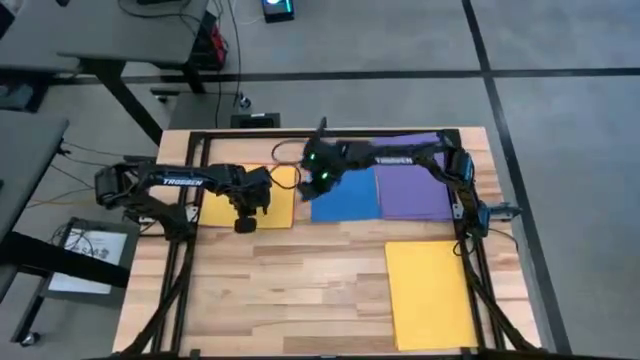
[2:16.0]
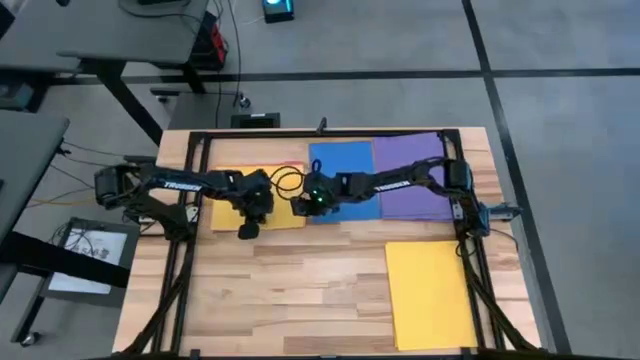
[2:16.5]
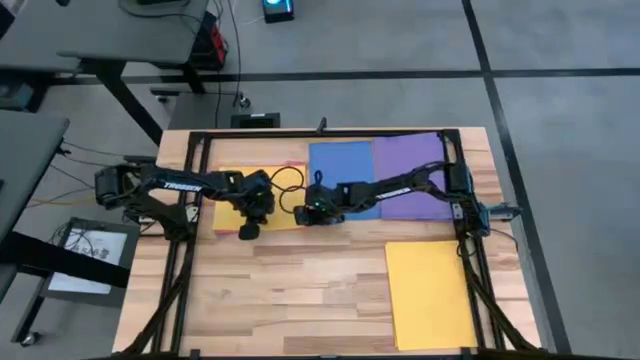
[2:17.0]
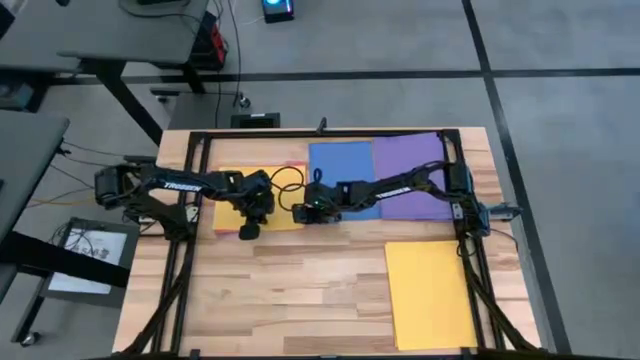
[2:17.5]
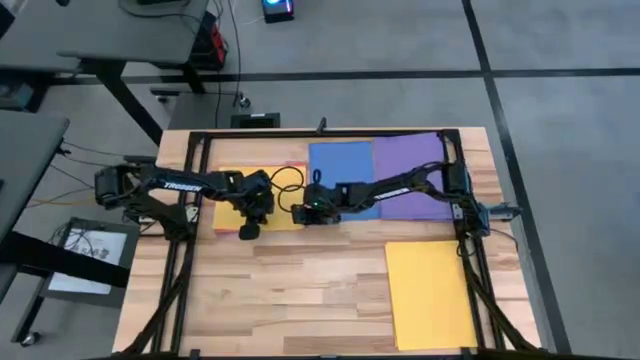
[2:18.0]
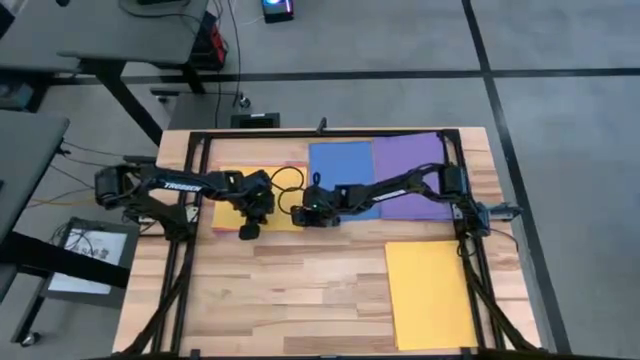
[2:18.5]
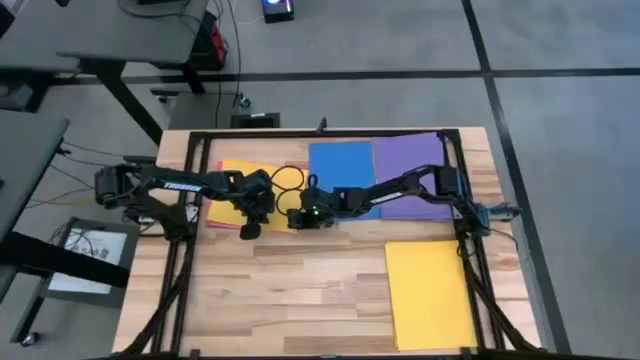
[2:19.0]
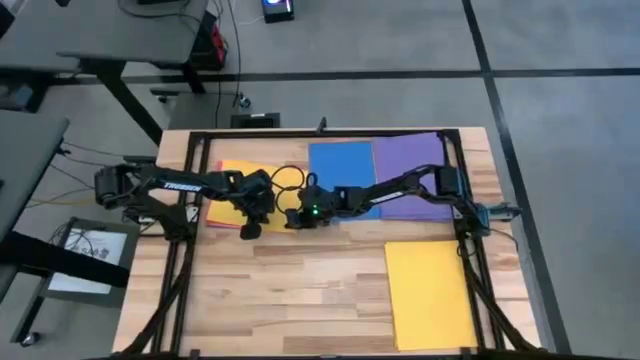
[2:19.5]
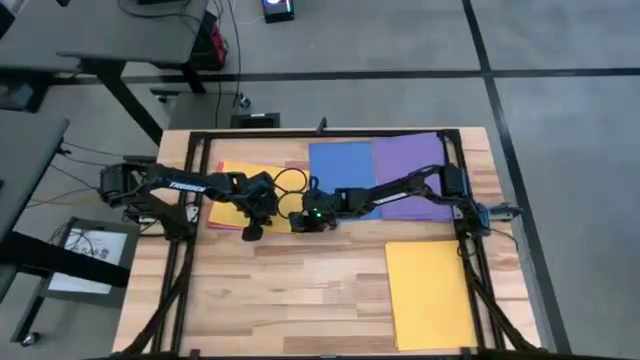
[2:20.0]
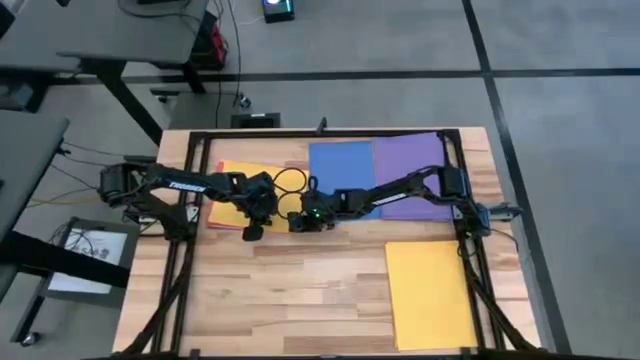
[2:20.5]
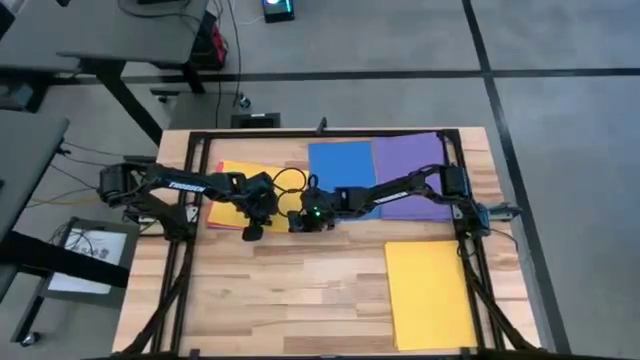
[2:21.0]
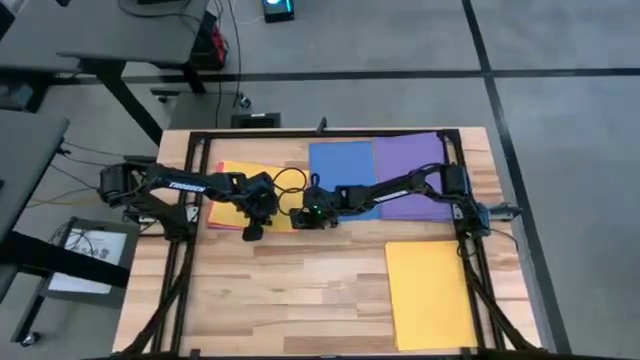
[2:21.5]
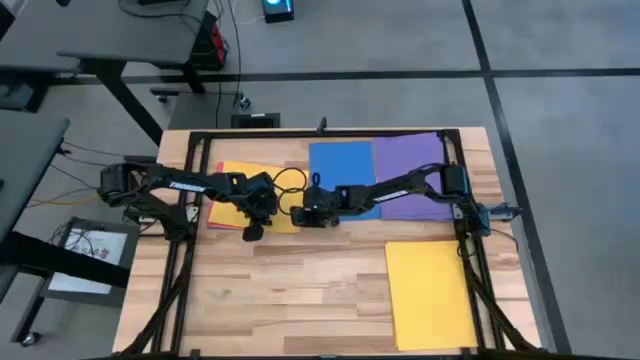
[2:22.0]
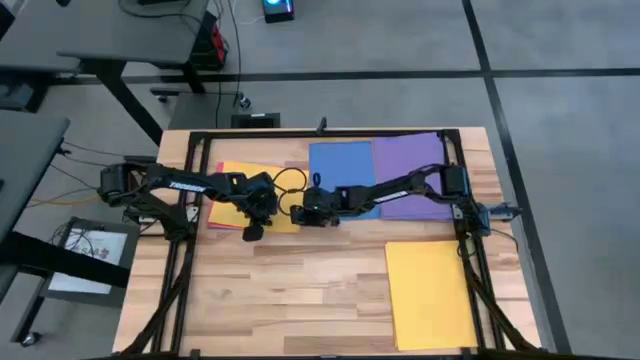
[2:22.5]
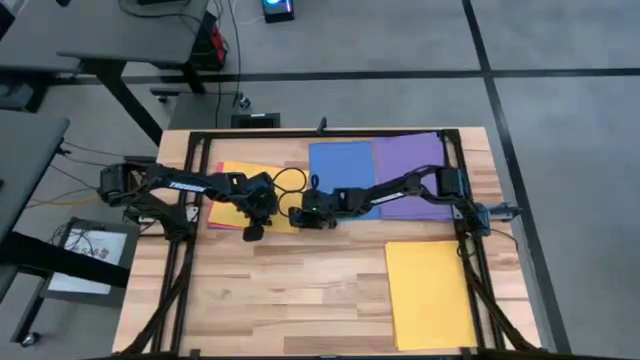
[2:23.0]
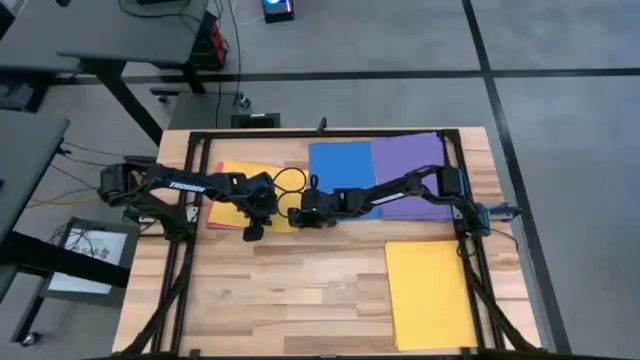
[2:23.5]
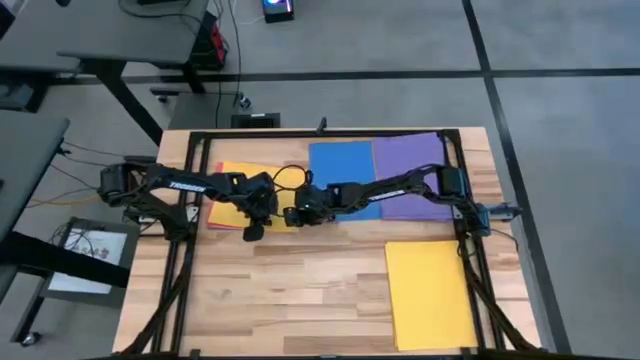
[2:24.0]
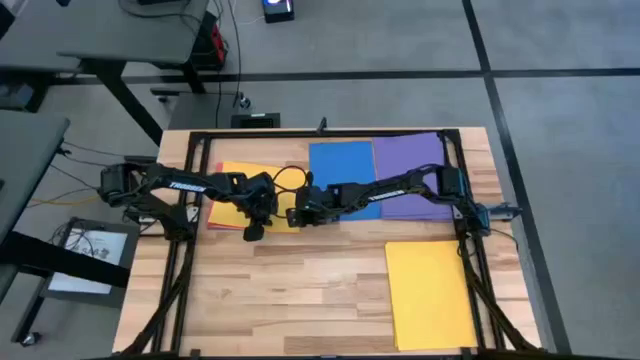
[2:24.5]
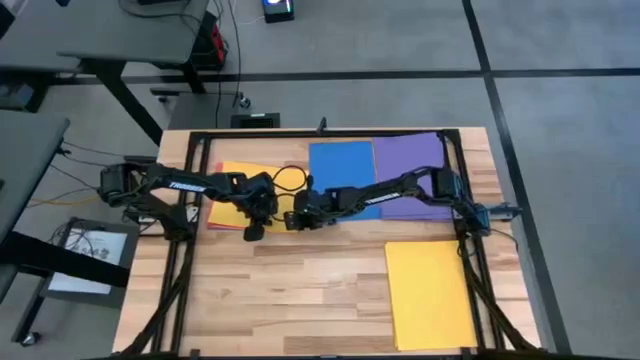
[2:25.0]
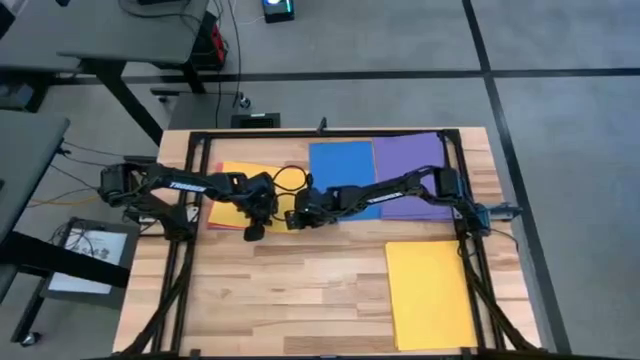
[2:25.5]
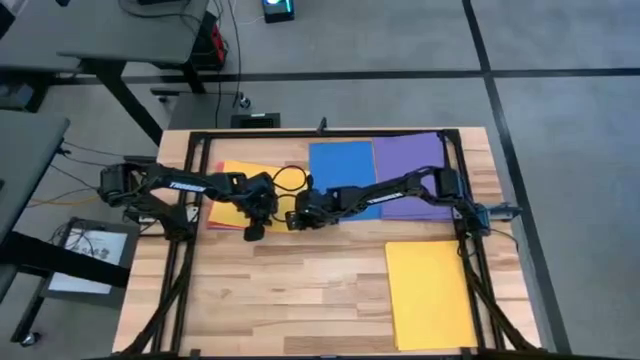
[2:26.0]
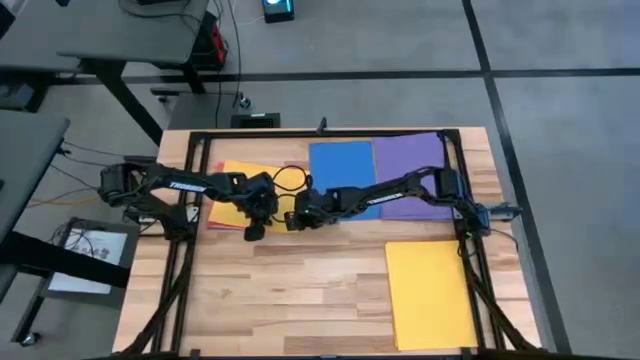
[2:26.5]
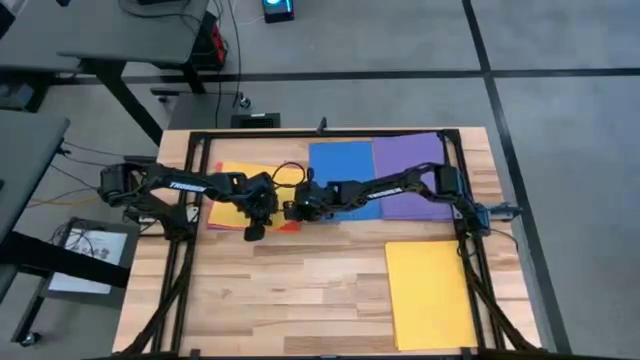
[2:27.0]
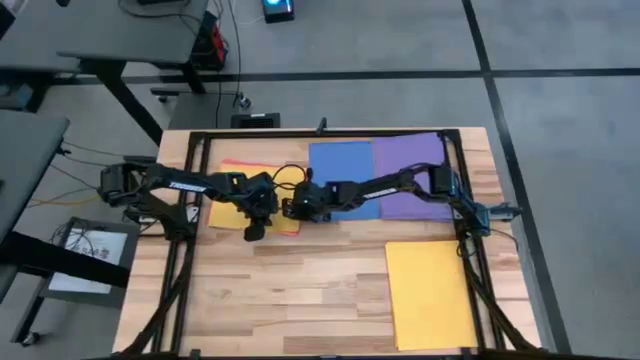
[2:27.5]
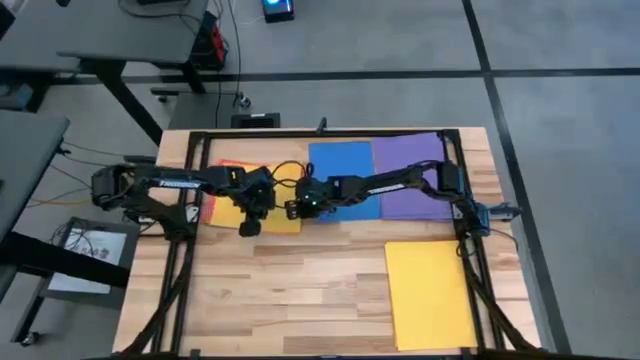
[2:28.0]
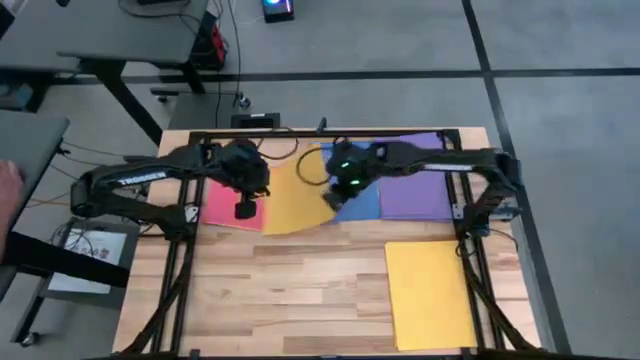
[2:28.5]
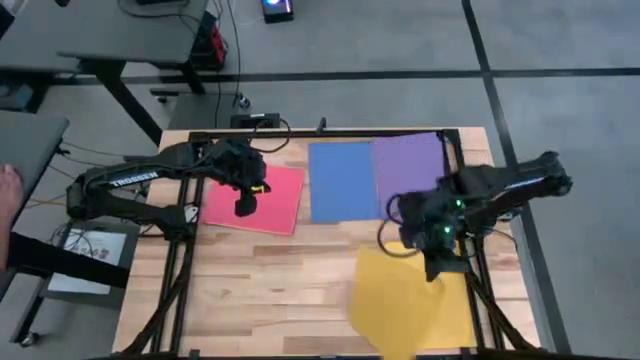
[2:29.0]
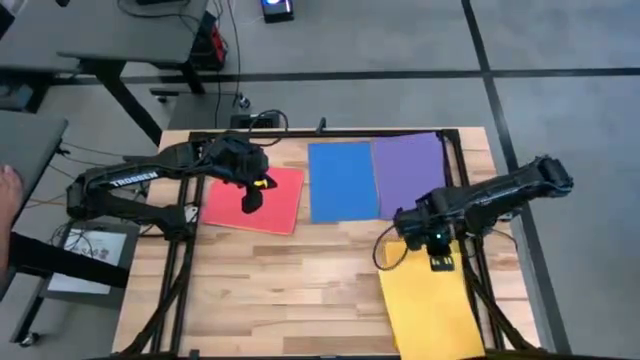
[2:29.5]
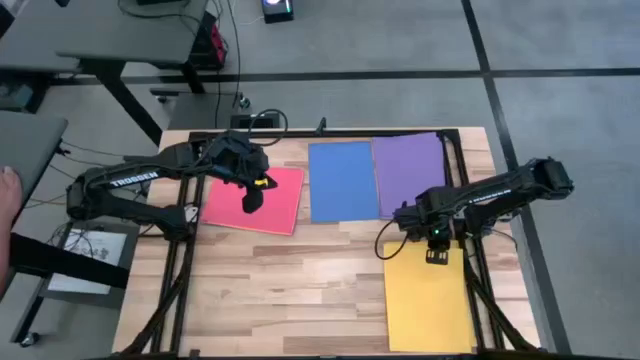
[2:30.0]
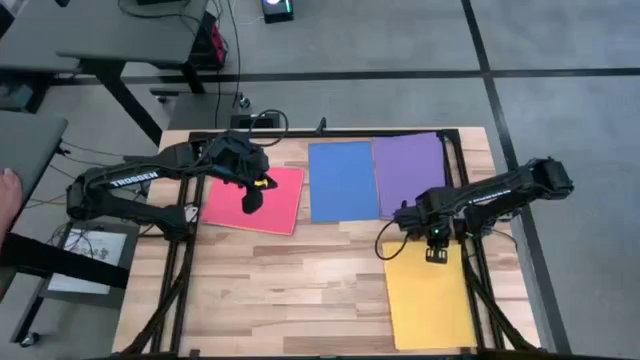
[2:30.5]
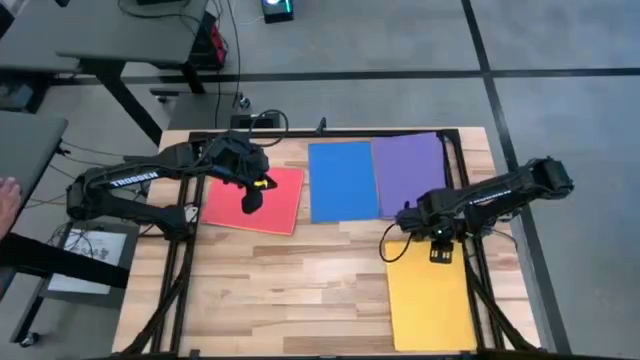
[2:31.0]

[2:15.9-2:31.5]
Task: Organize paper
Stack the yellow paper on the bottom right yellow papers

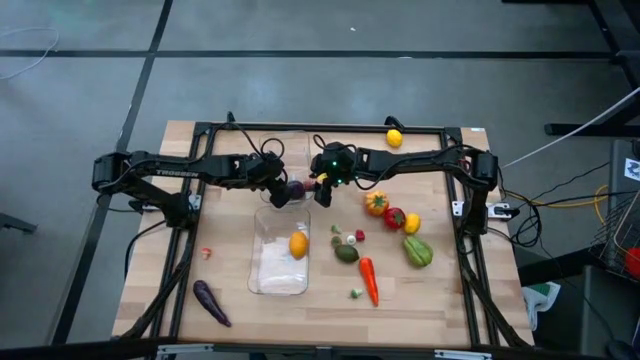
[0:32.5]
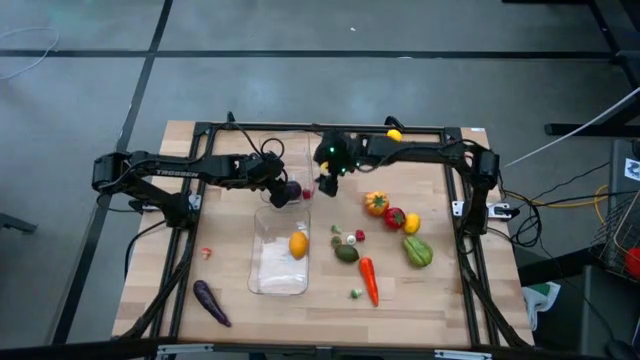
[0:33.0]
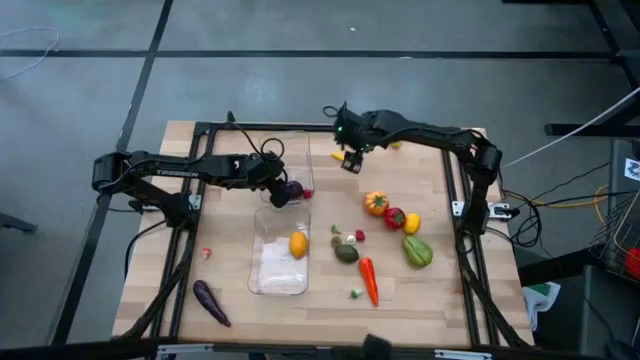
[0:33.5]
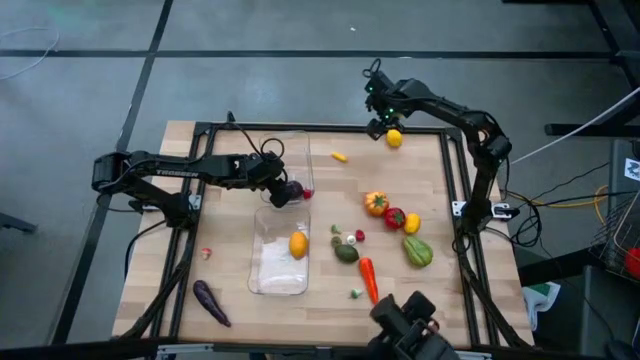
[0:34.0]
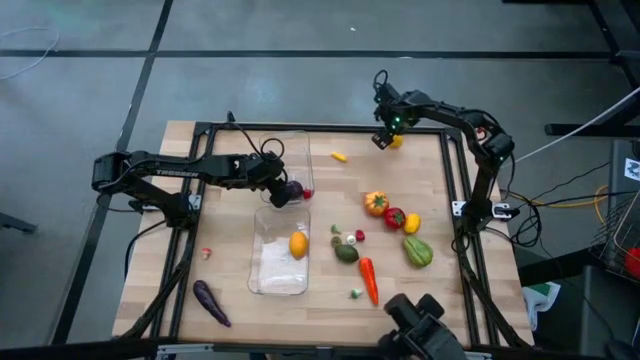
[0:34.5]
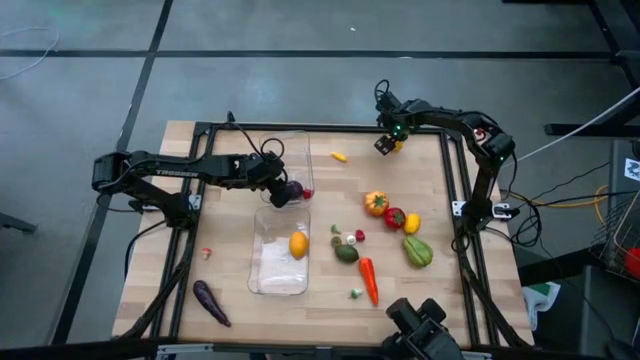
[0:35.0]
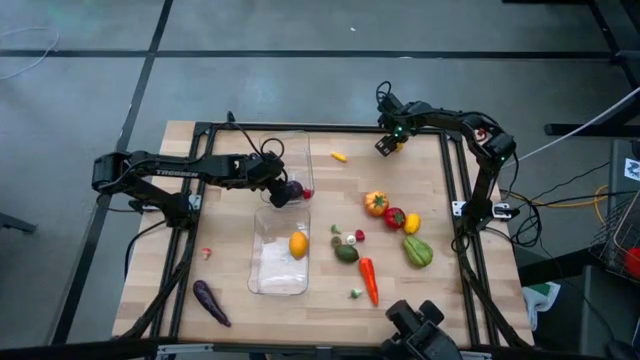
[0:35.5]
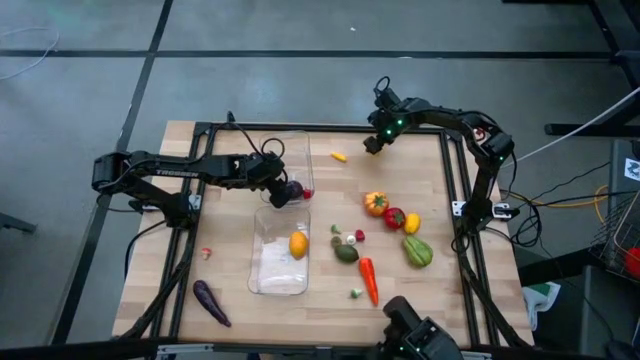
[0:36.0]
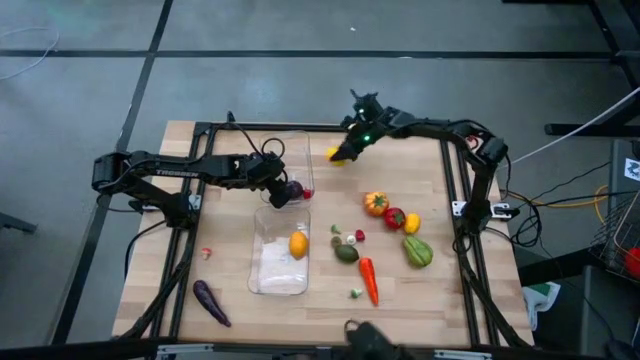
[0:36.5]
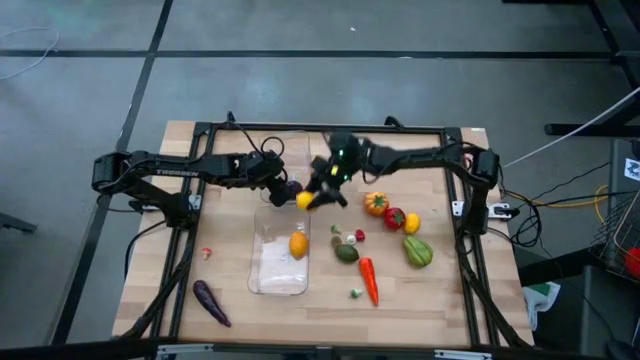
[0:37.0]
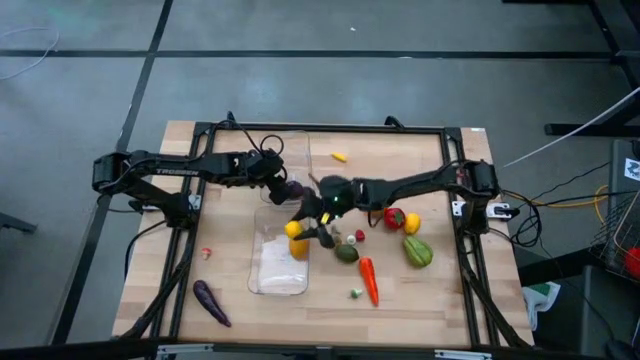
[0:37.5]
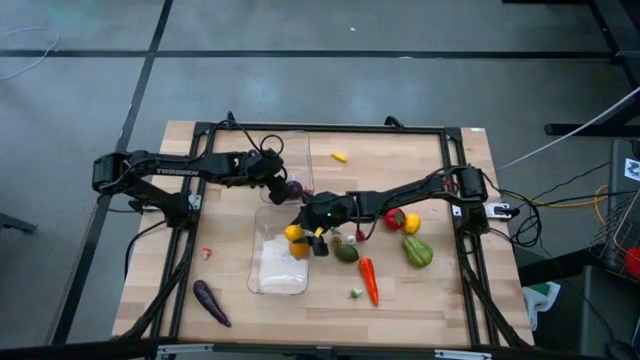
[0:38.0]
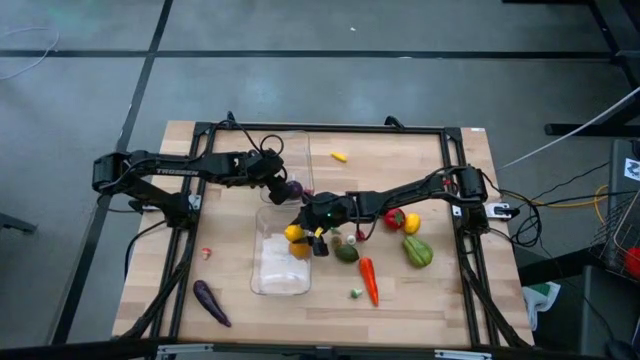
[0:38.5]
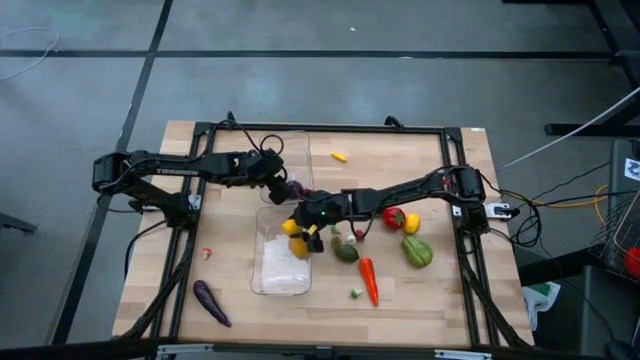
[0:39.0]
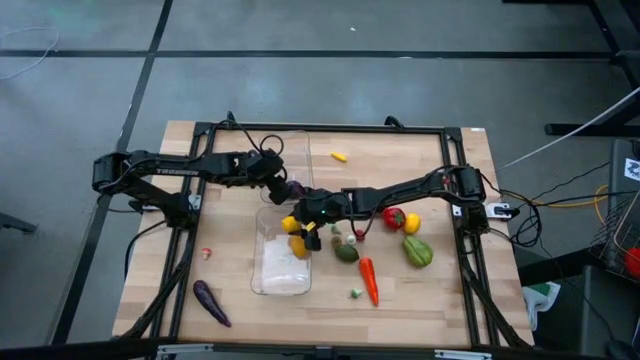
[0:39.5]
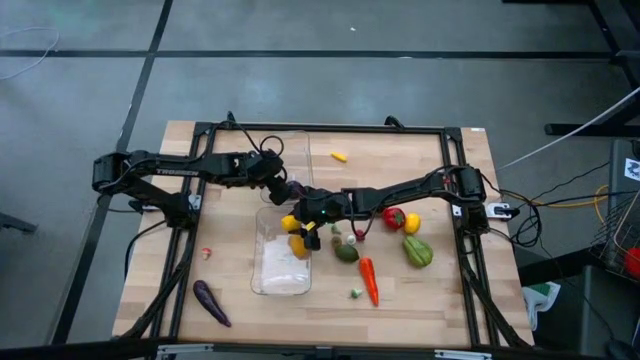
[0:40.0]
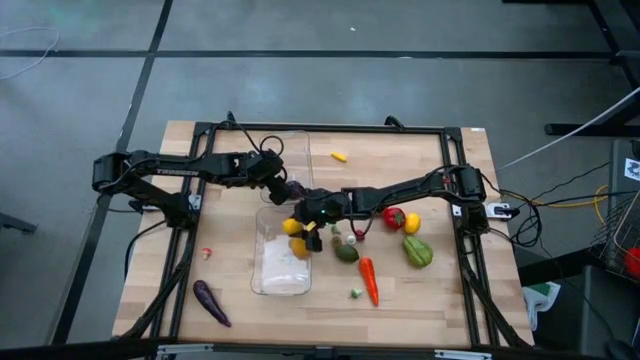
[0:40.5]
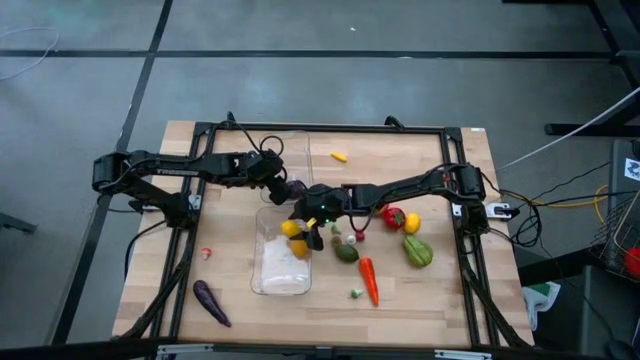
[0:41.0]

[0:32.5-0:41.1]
Task: Sort produce into baskets
Put the top yellow lemon into the bottom transparent bin
